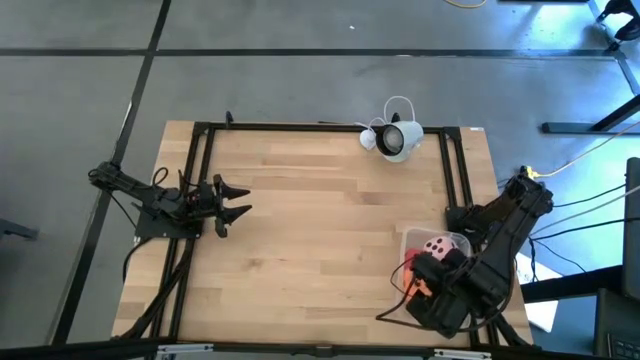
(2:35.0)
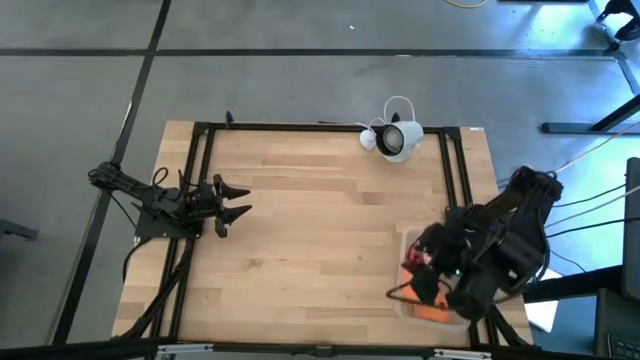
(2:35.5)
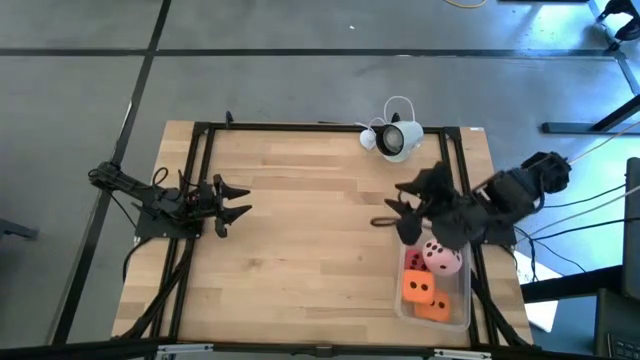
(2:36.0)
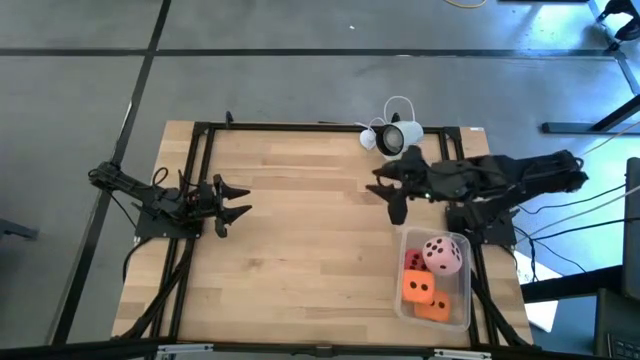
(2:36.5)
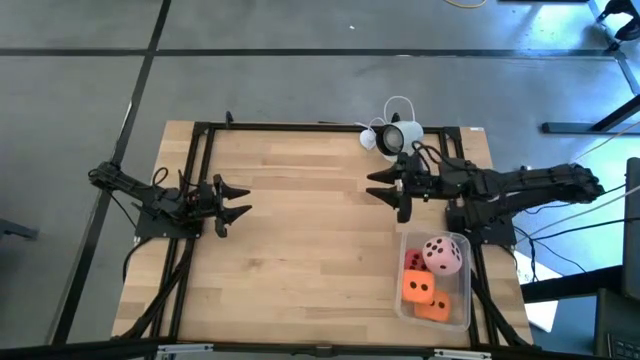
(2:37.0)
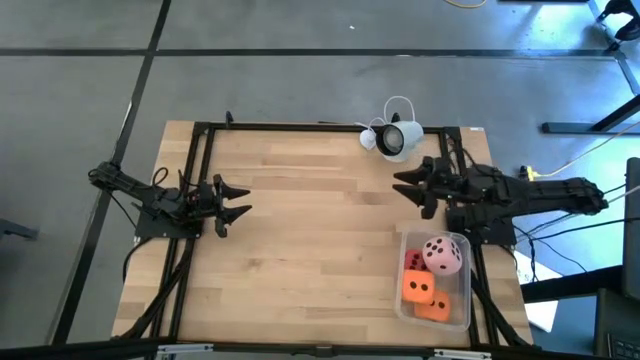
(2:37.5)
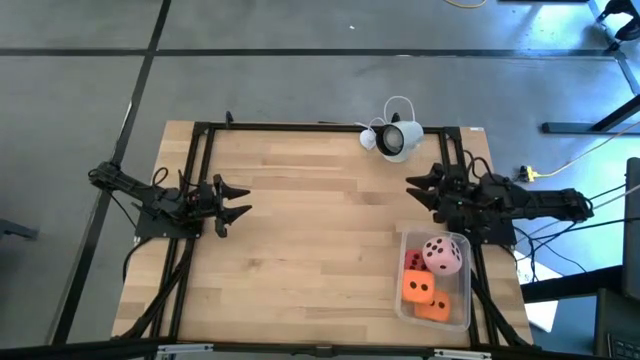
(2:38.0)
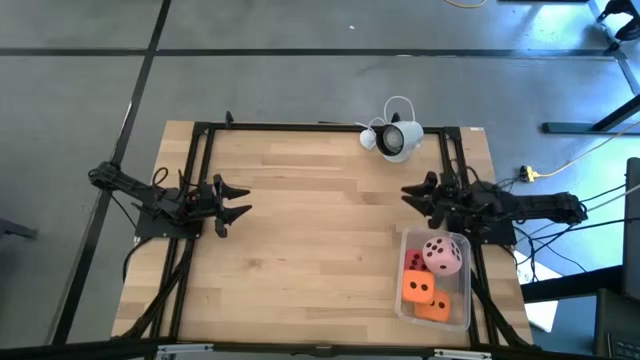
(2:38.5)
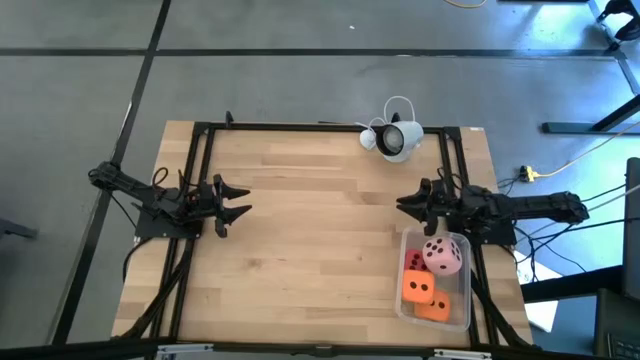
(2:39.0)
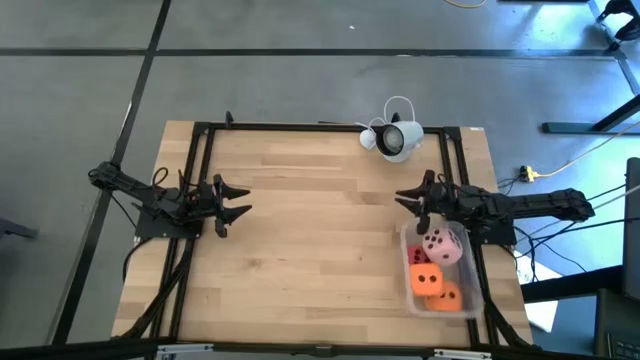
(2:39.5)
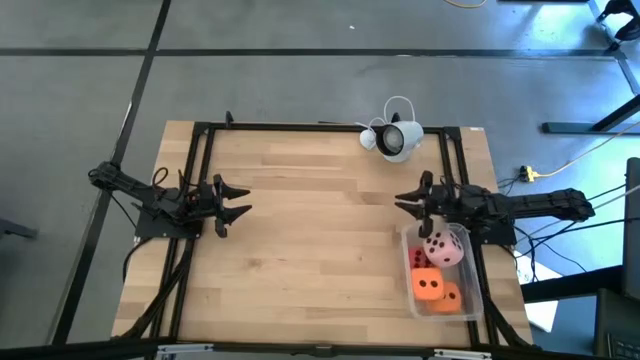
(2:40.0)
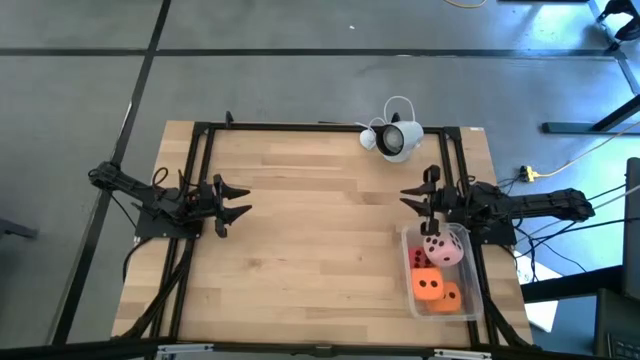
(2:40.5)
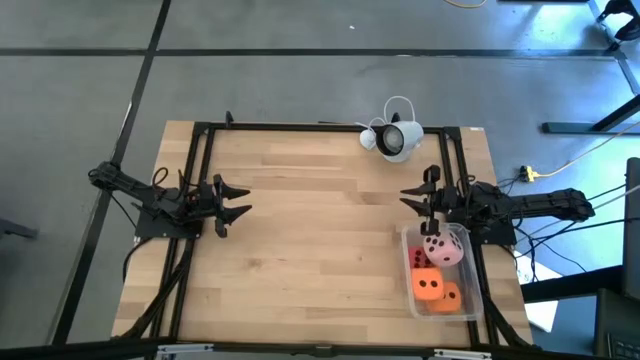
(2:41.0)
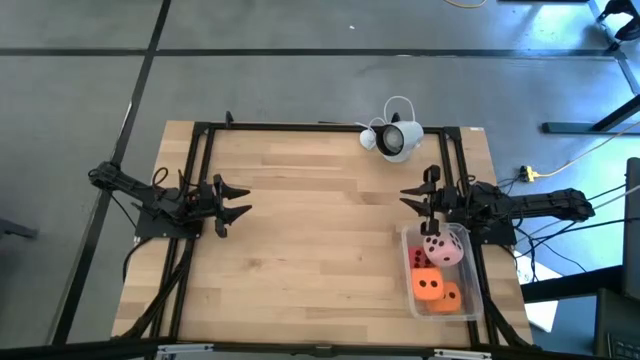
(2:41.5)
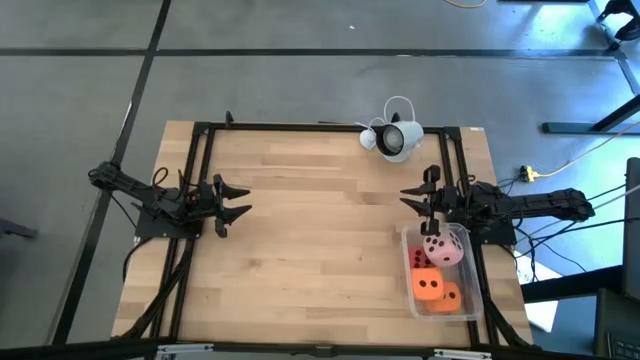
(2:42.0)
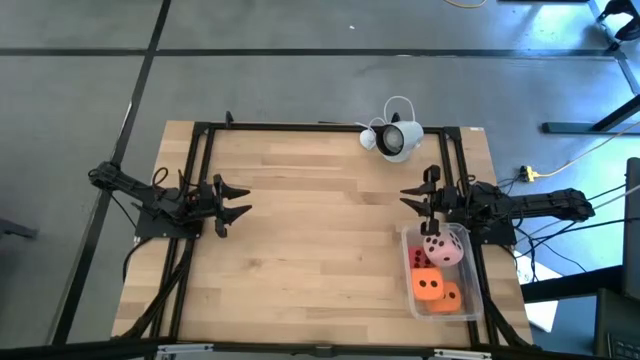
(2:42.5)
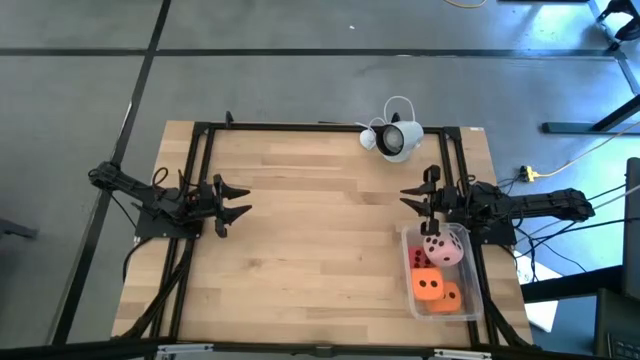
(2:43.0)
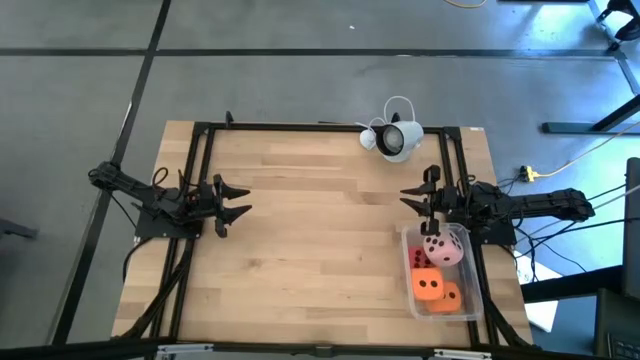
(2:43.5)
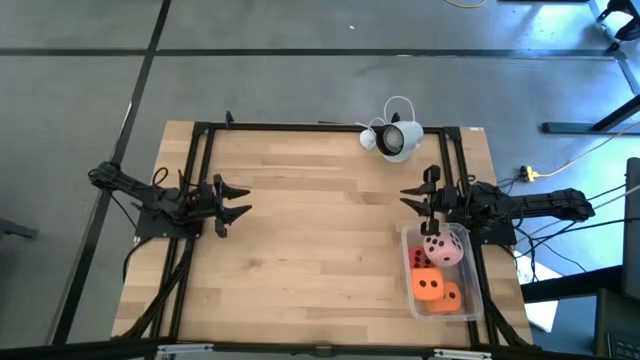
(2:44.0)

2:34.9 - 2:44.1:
Task: Pick & Place Dice
Return to Home Position

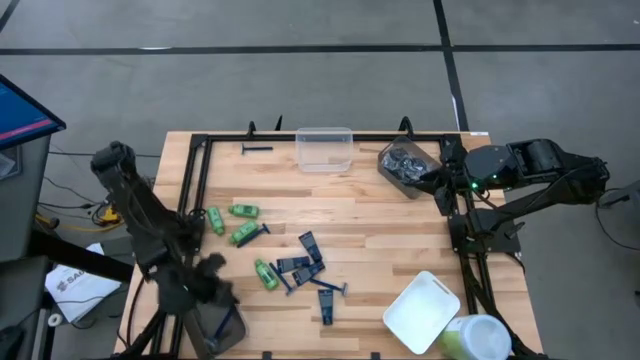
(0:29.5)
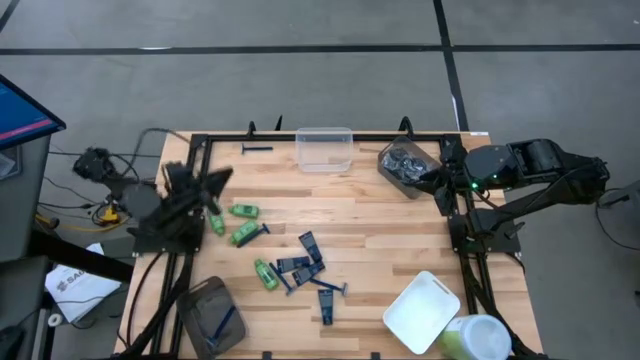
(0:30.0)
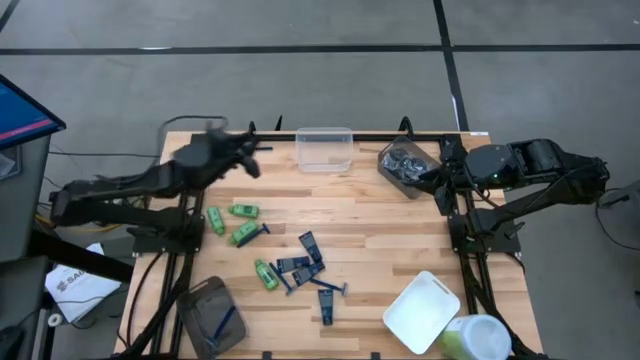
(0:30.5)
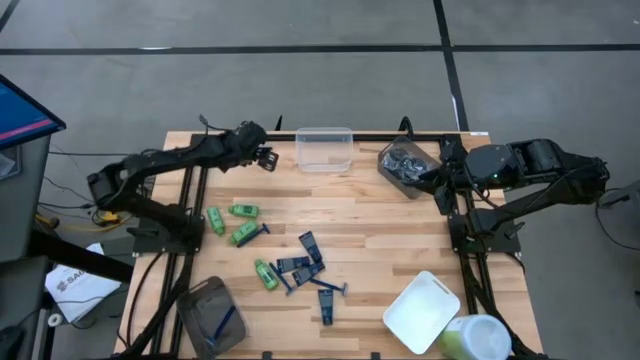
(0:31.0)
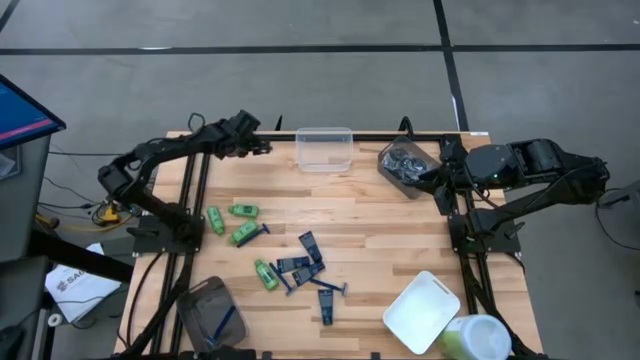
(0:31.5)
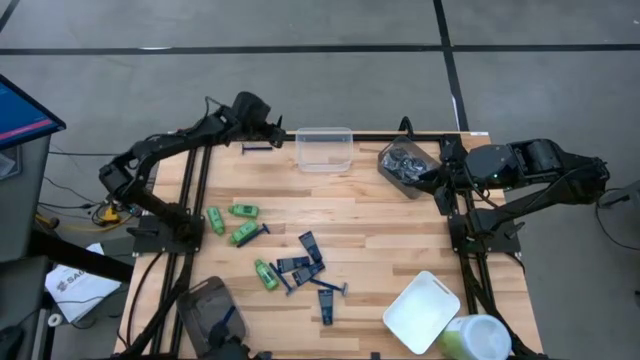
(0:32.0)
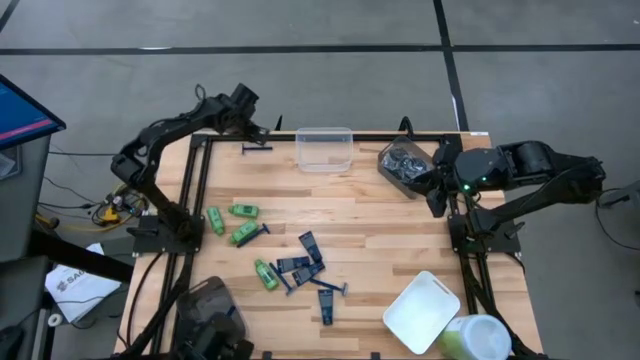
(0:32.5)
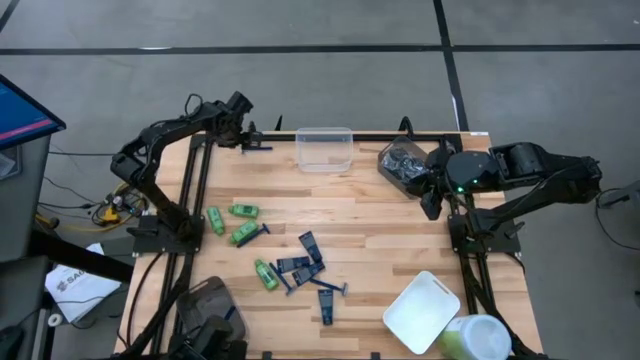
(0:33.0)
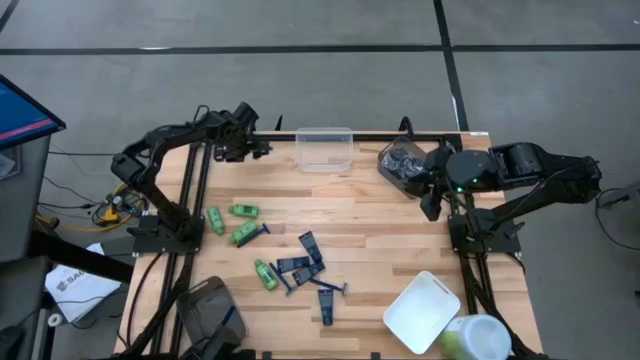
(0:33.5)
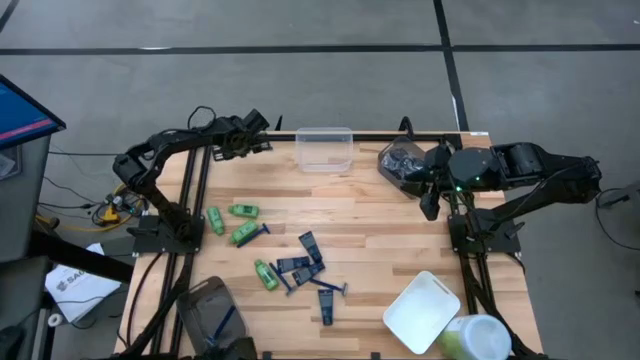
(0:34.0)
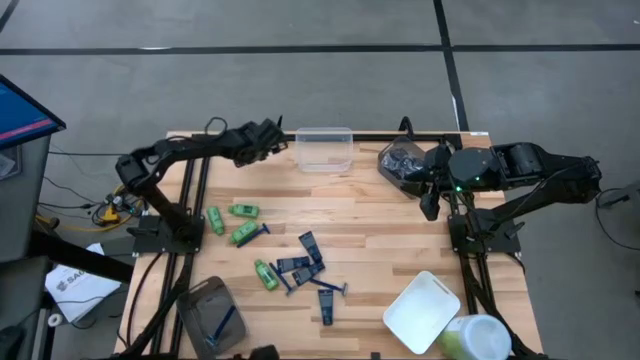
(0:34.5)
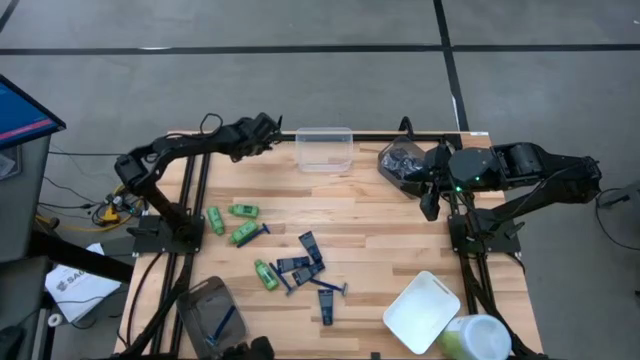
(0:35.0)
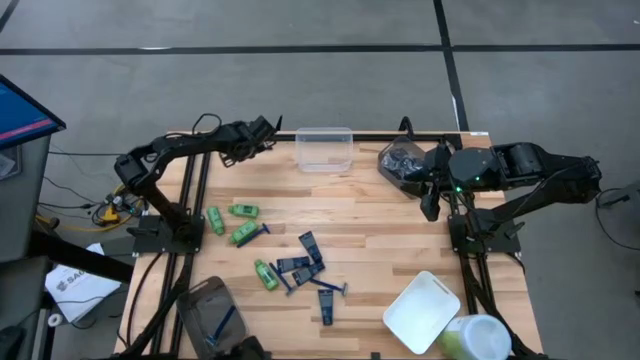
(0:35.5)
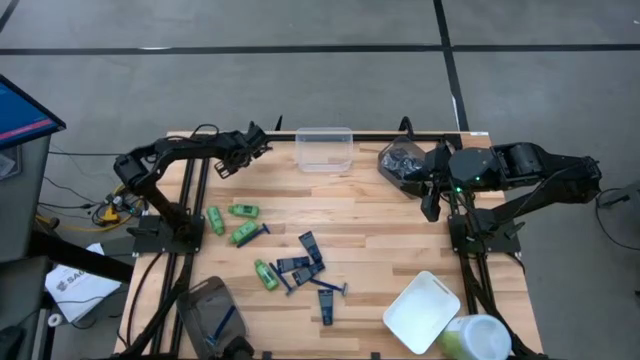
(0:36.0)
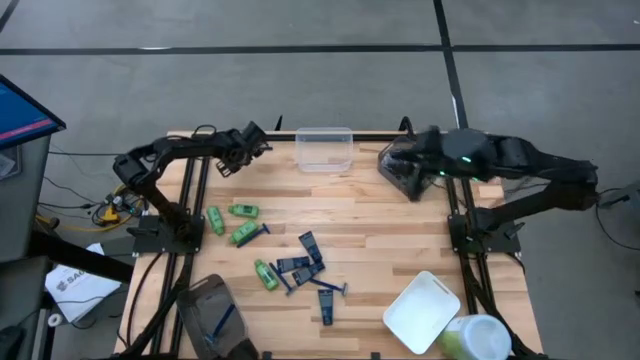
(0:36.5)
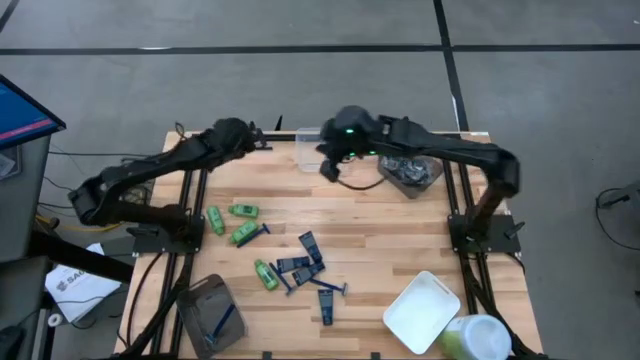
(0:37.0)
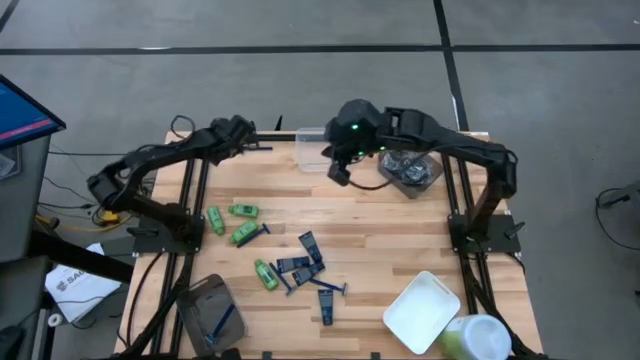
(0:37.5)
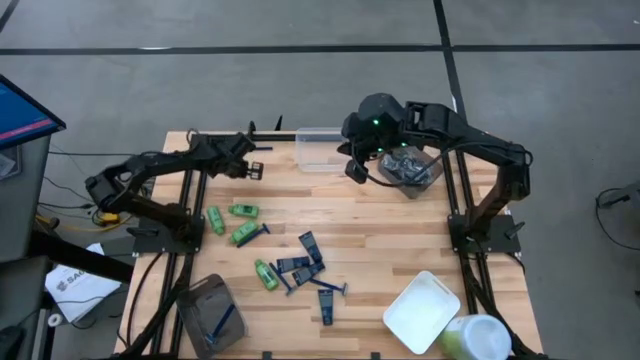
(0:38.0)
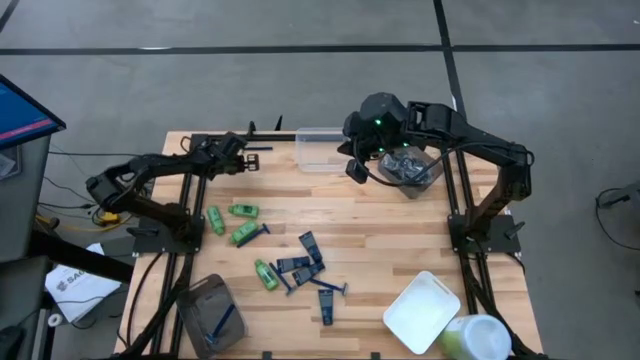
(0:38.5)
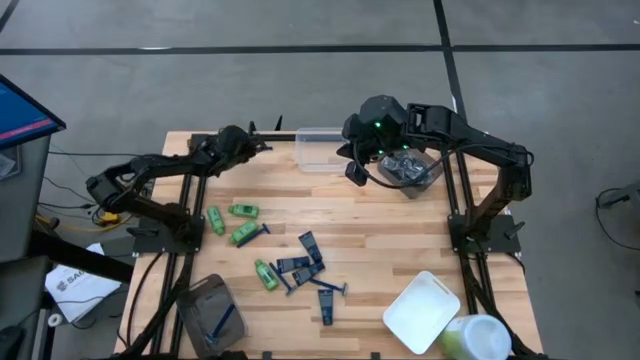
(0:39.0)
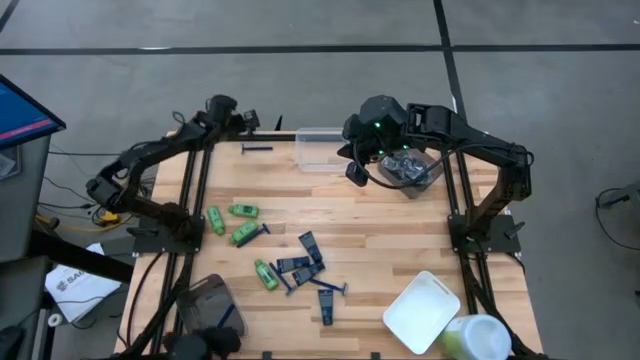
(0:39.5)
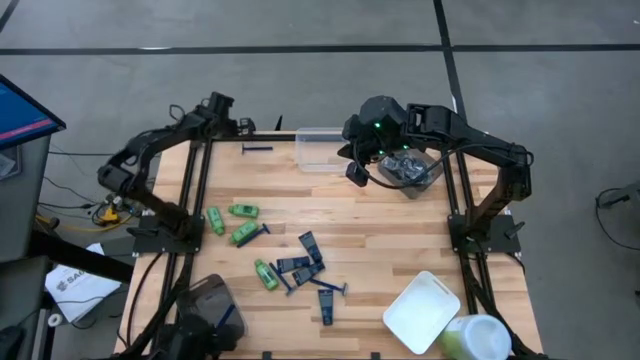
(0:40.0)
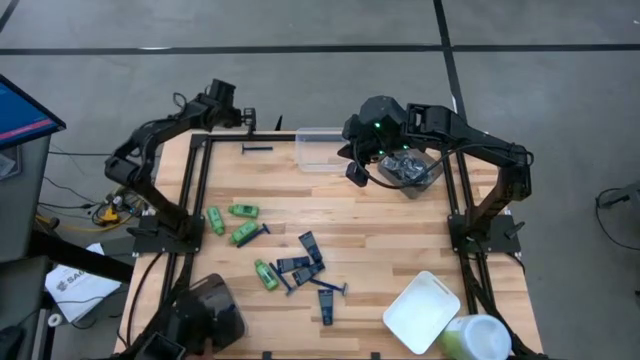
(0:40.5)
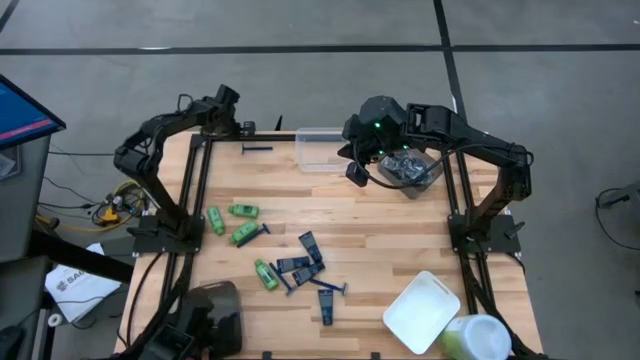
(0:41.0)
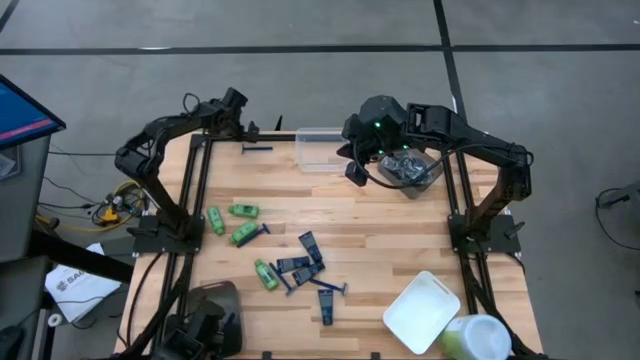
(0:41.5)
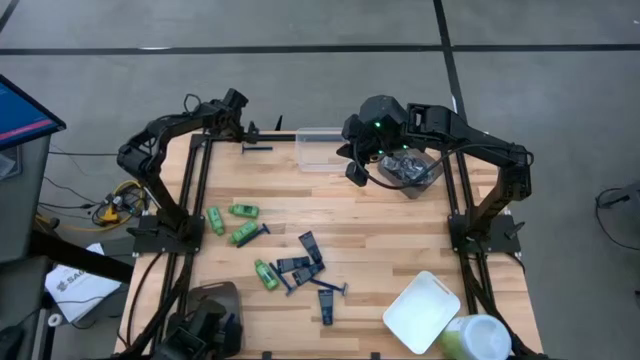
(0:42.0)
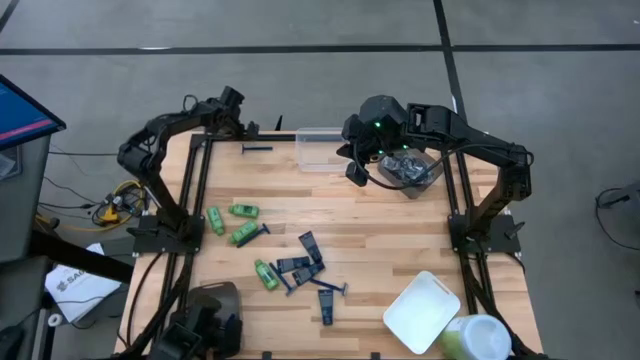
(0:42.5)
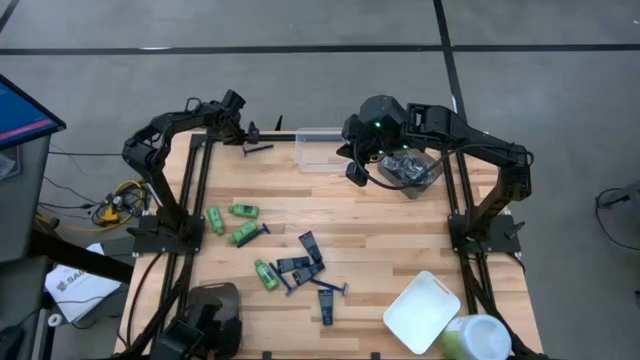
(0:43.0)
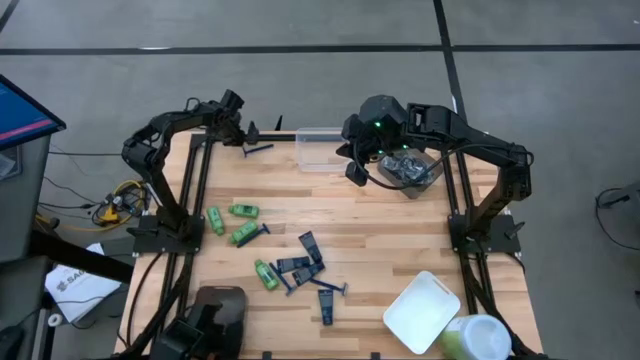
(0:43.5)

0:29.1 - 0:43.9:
Task: Pick & Place Travel size toiletries
Put the blue razor into the bottom black bin
